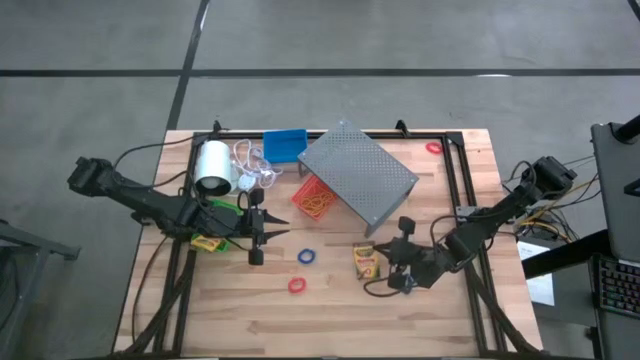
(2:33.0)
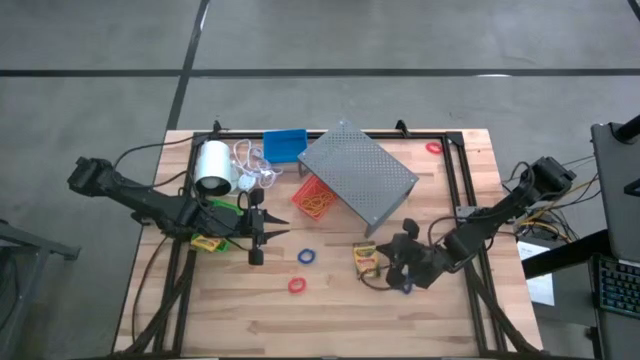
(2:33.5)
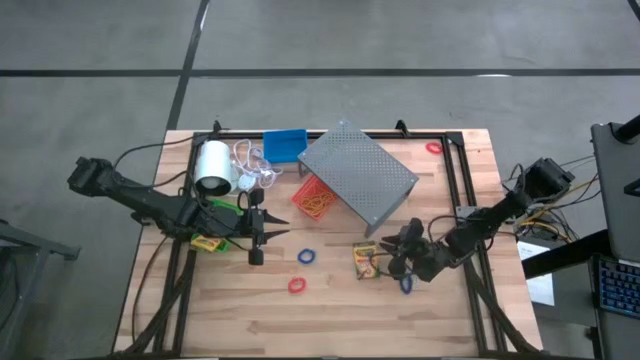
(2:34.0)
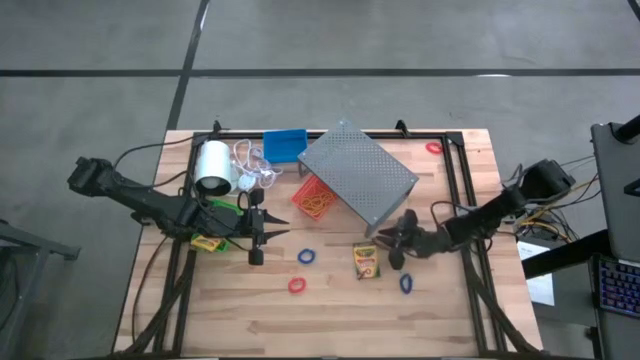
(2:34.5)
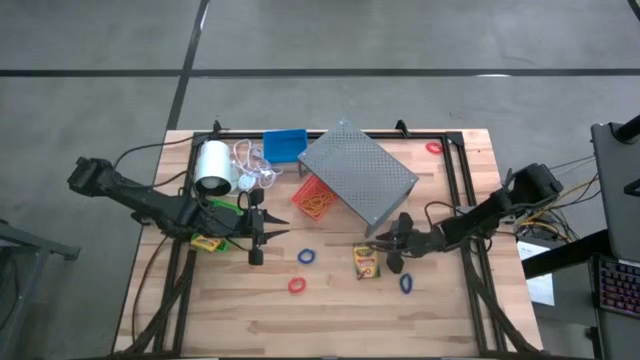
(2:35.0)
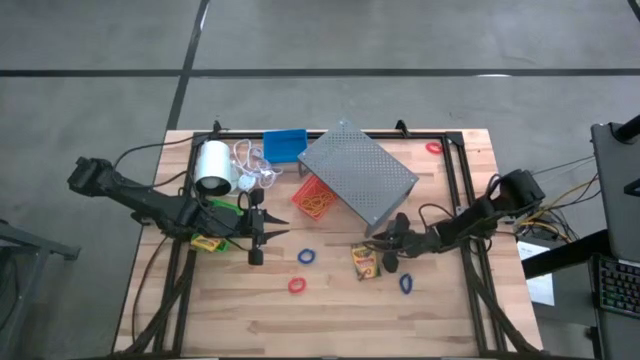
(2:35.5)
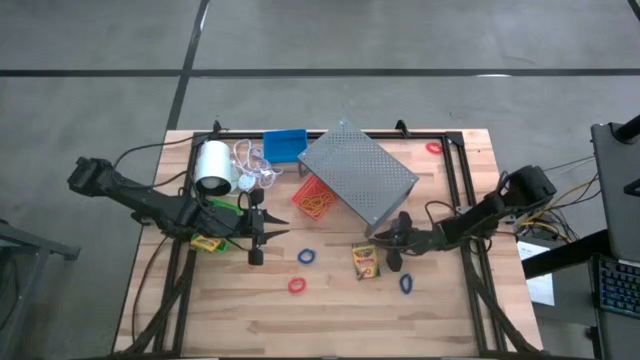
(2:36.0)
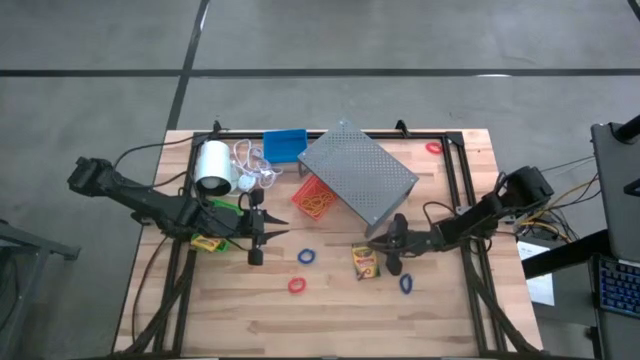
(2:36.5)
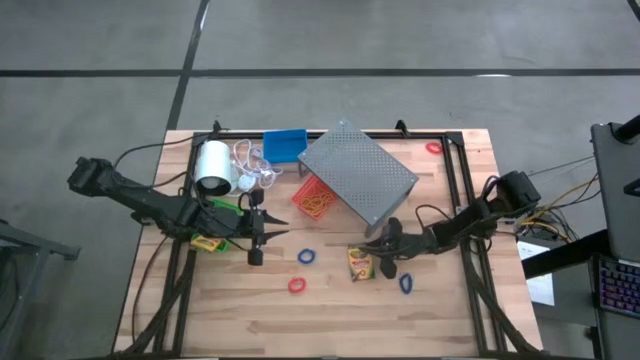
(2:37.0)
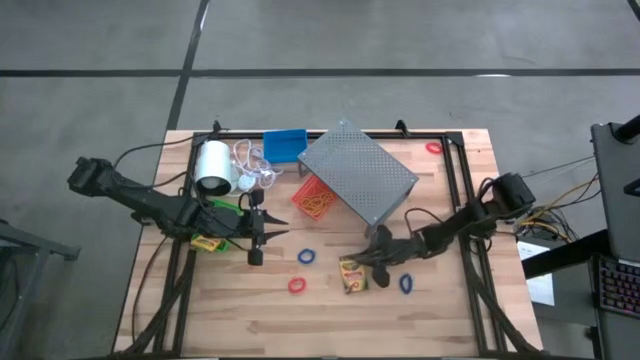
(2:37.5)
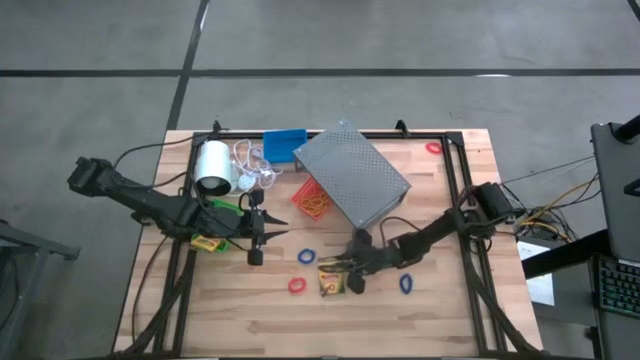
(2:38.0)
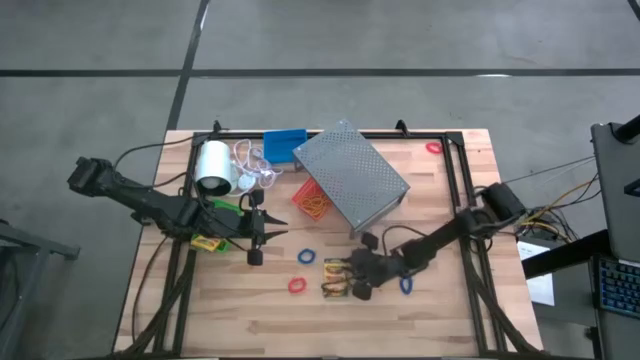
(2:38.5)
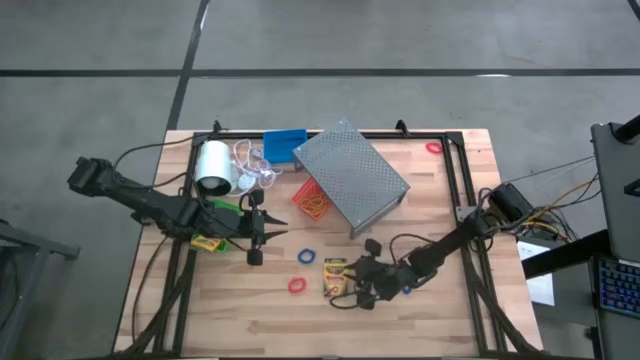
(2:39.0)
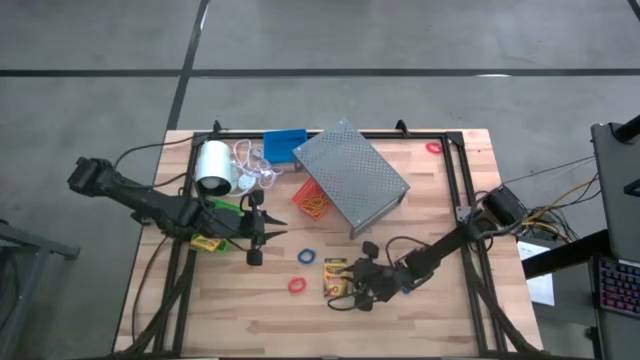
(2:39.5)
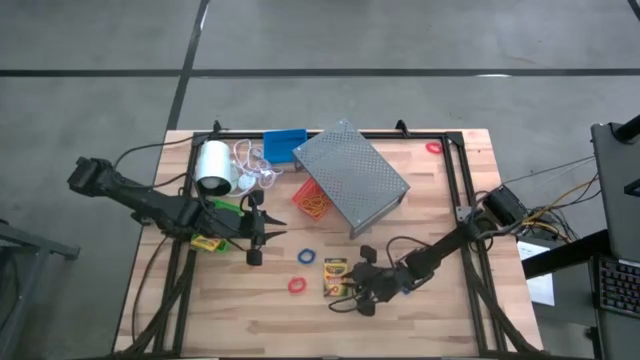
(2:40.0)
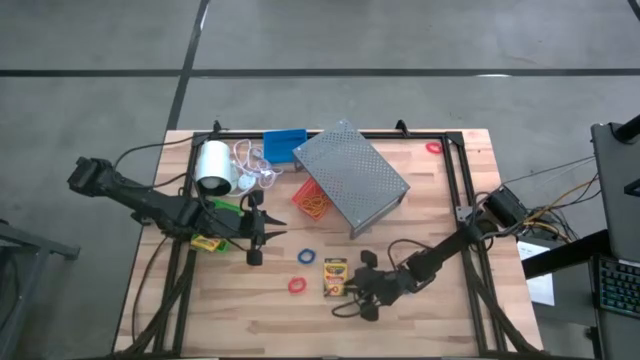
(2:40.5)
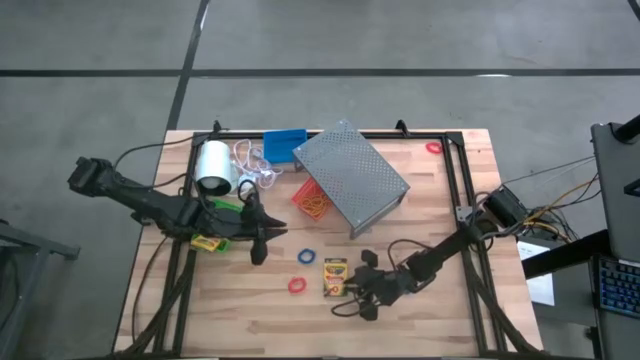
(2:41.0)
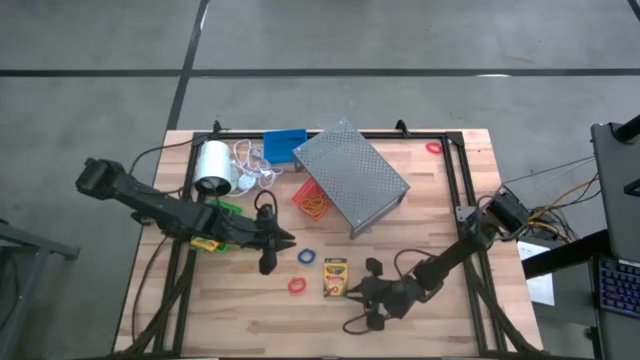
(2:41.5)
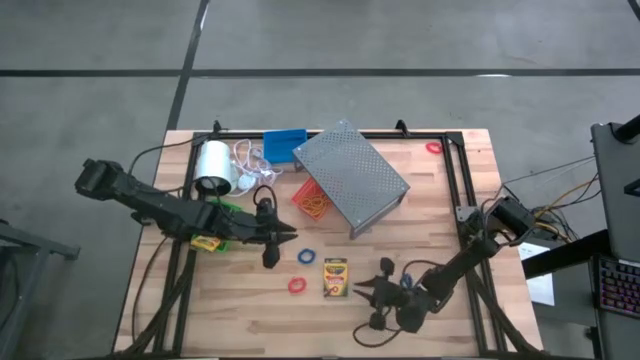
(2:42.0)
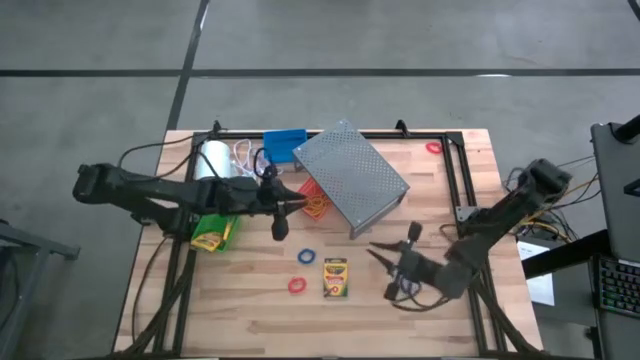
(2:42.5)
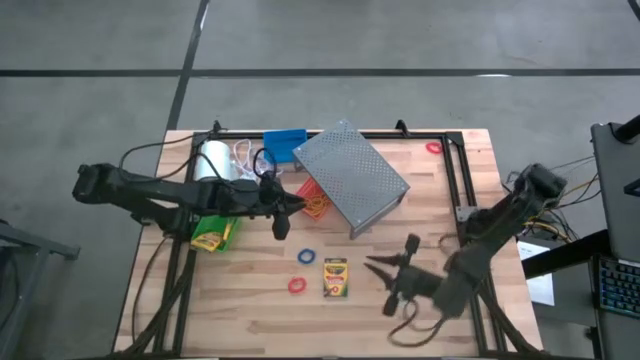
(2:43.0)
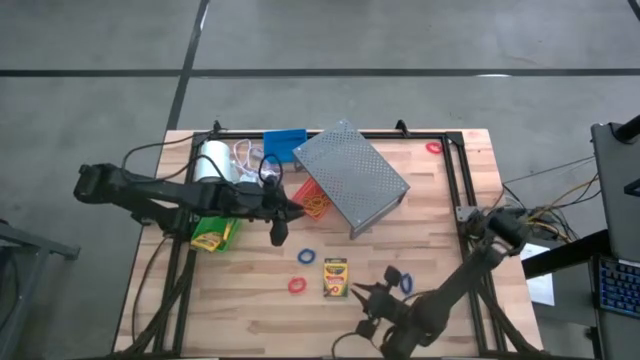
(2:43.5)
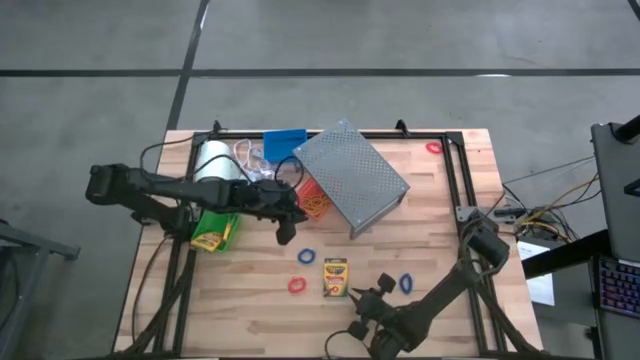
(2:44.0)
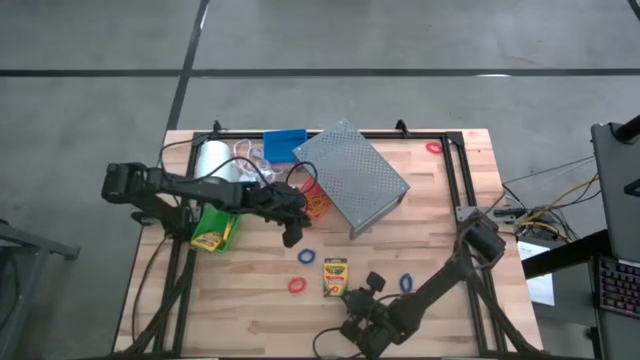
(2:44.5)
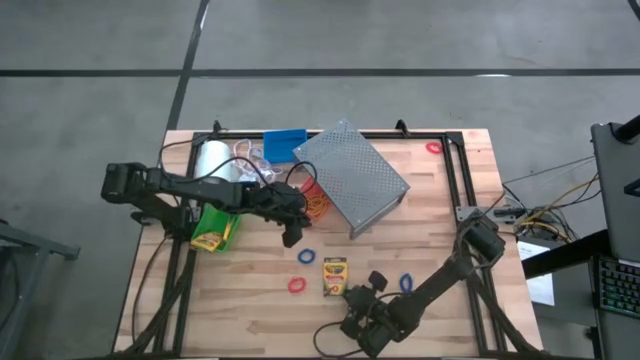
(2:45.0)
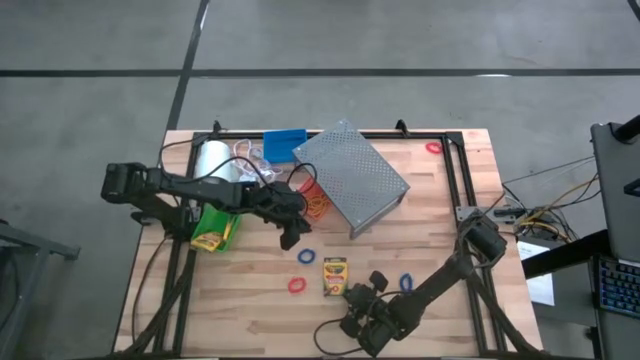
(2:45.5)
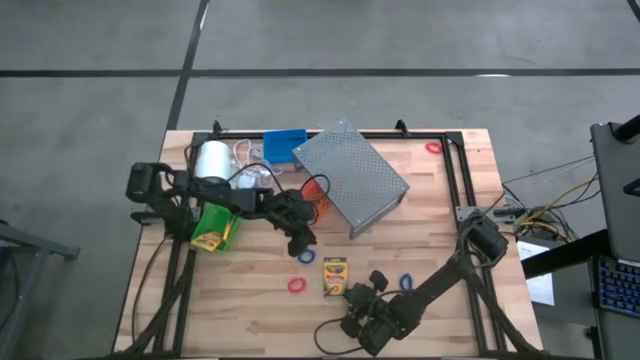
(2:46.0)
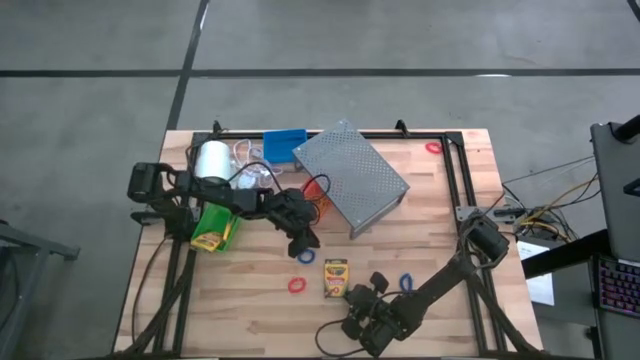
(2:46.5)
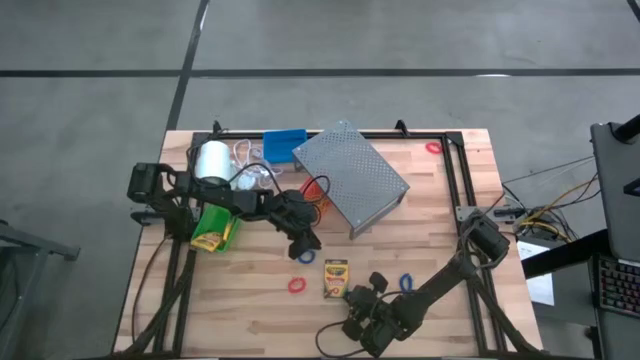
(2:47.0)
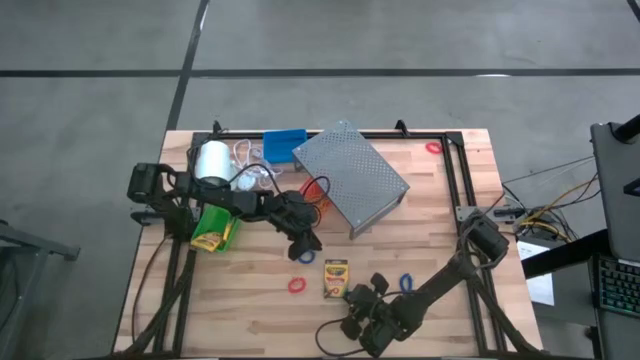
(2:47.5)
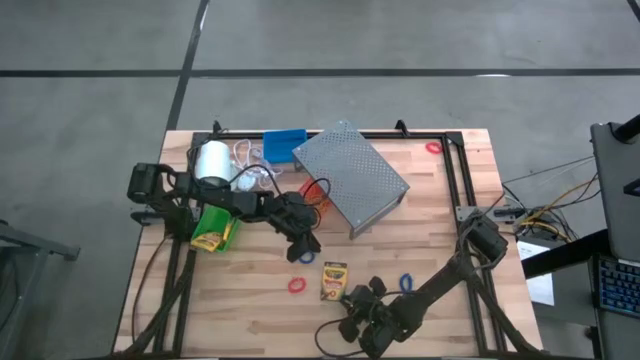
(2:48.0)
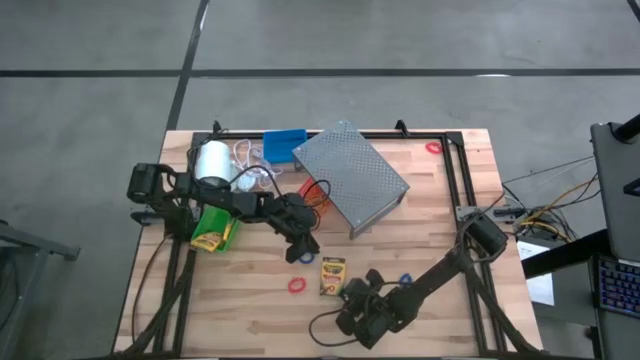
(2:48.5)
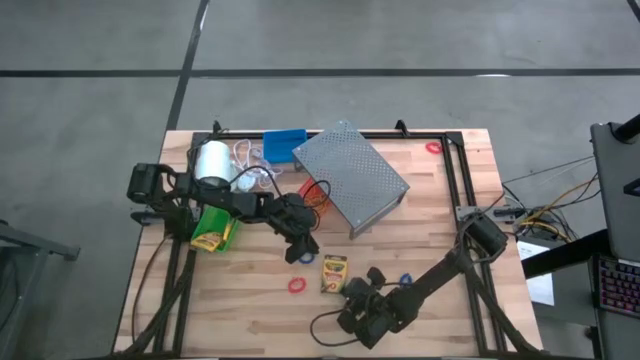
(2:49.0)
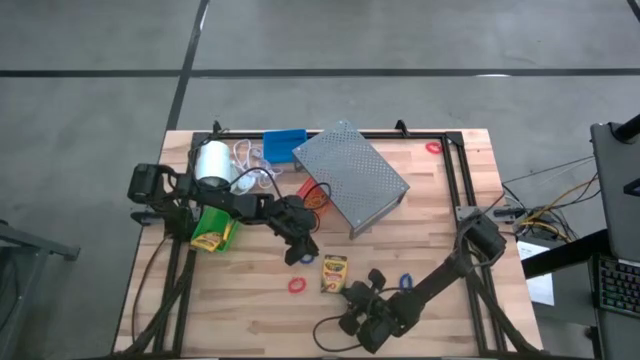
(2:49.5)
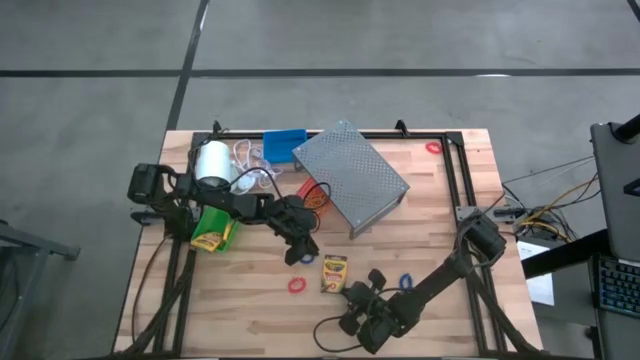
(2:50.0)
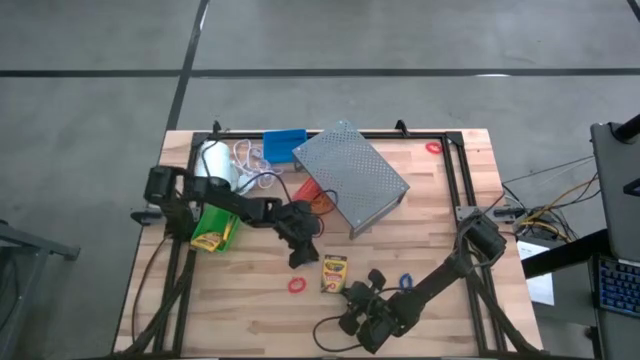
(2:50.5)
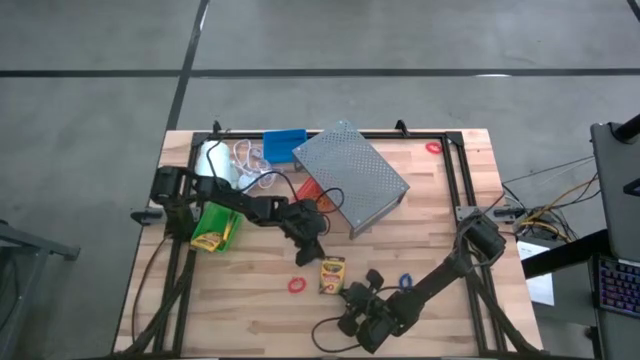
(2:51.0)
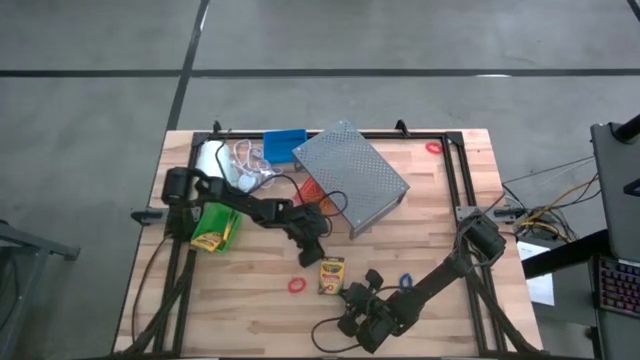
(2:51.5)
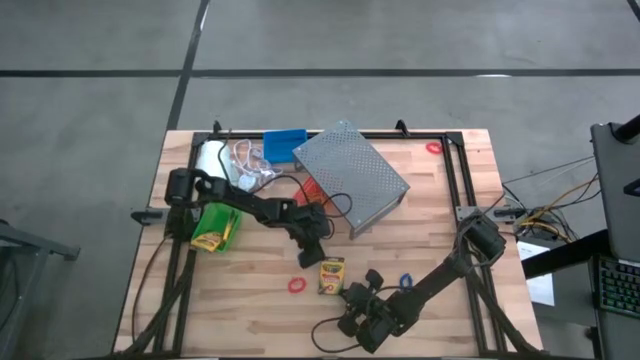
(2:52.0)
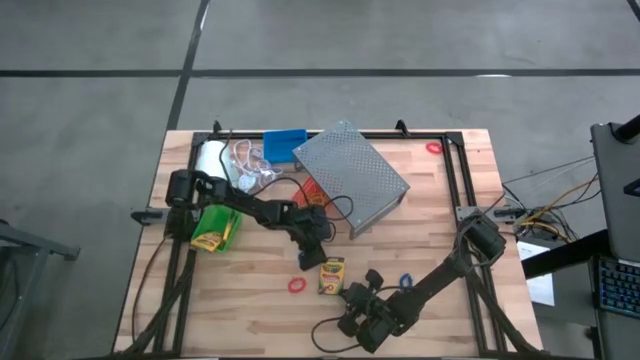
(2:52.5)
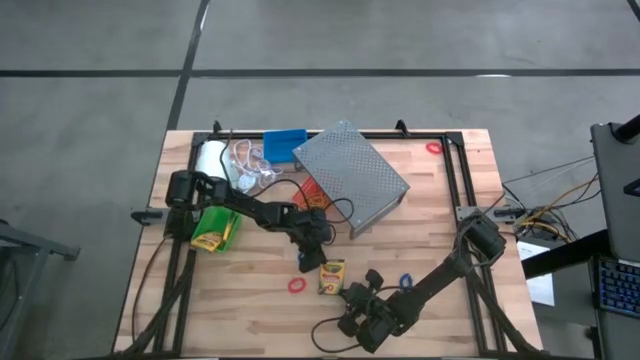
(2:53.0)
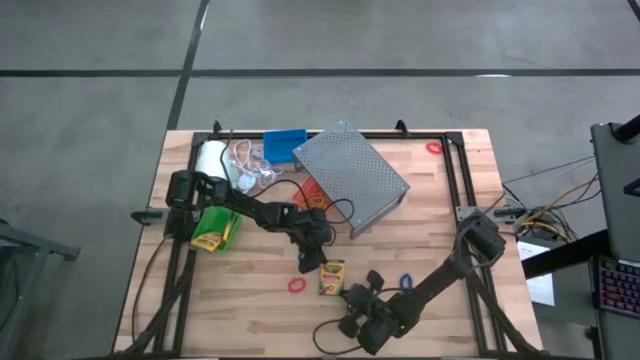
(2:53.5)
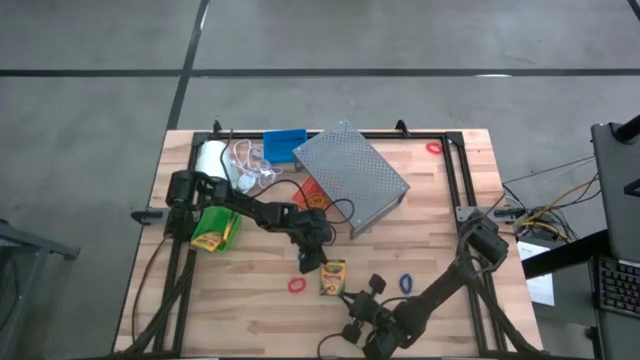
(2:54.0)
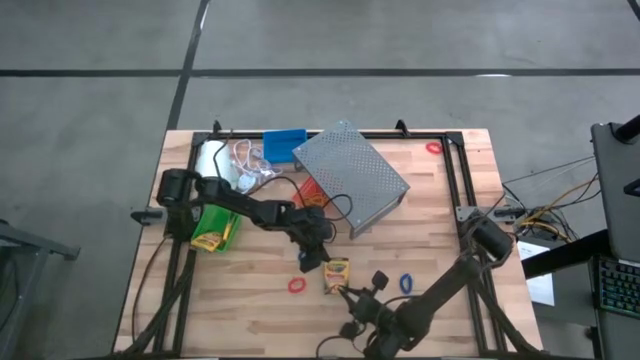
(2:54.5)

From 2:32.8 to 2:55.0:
Task: Pick & Place Office Desk Supplies
Put the crayon box into the green bin
